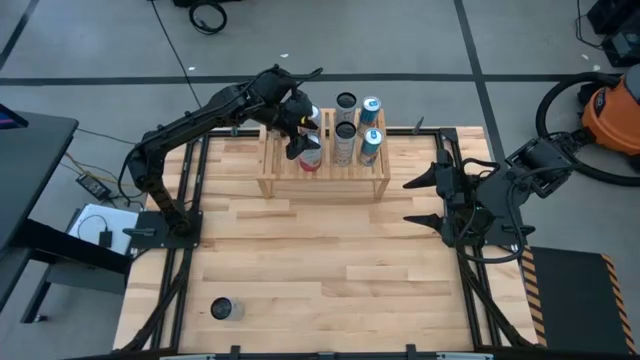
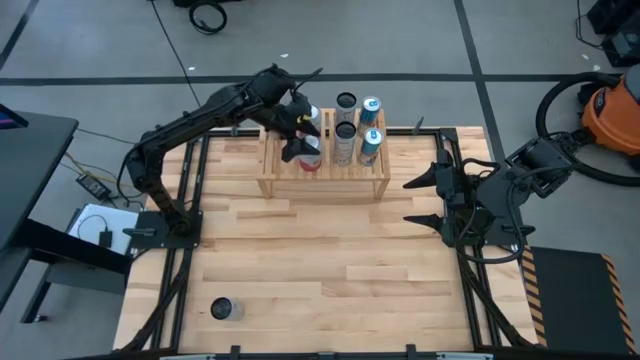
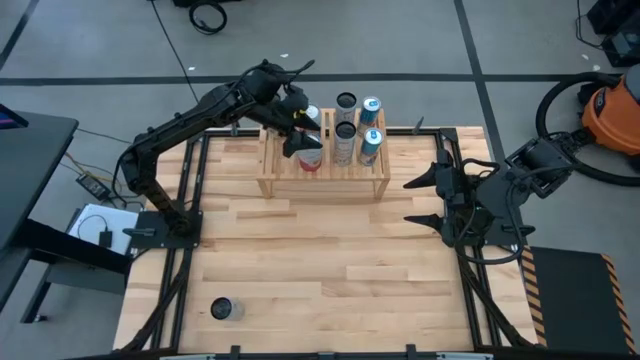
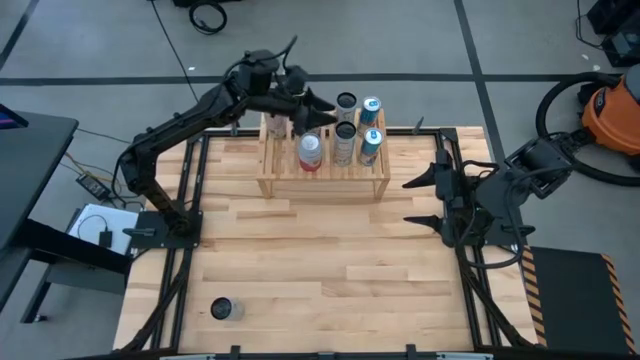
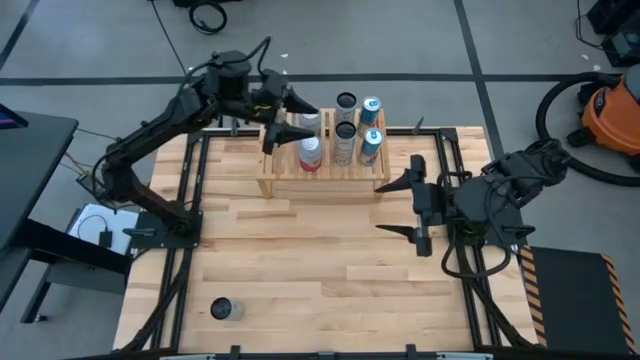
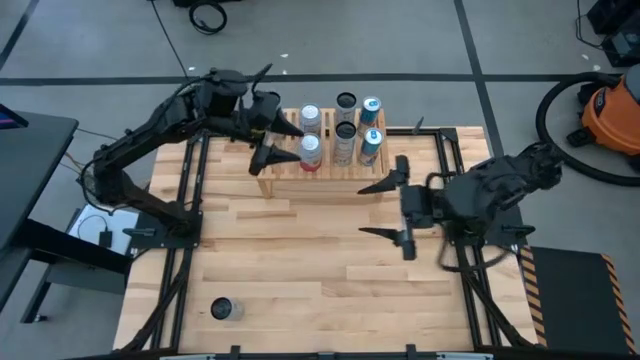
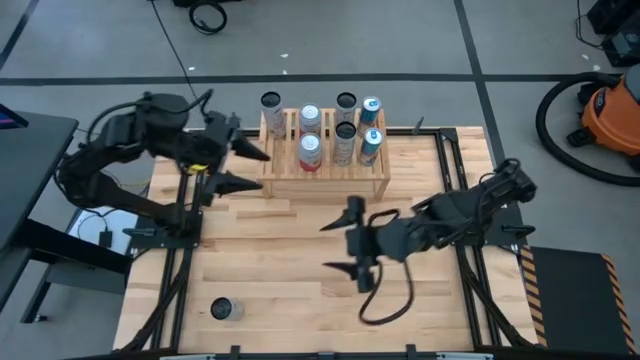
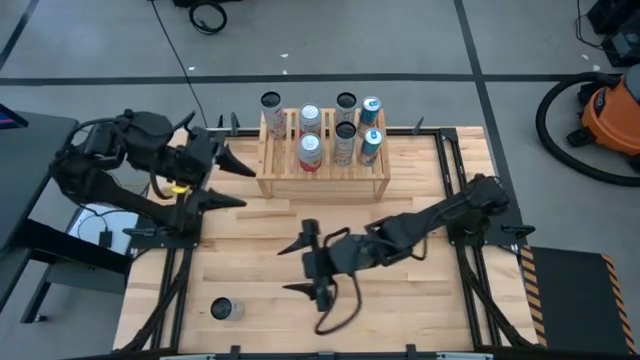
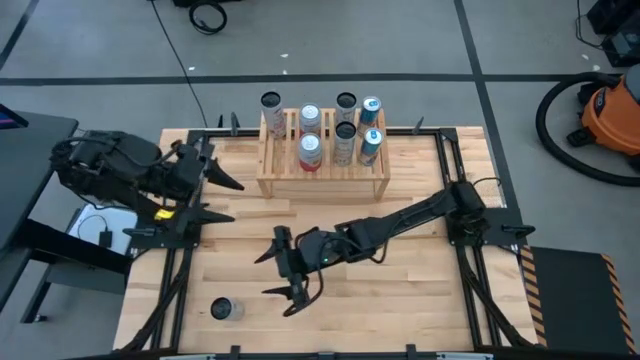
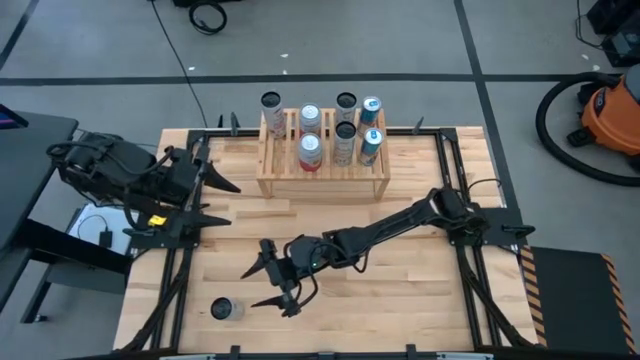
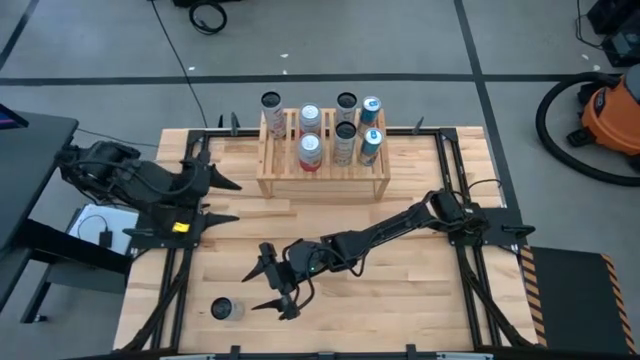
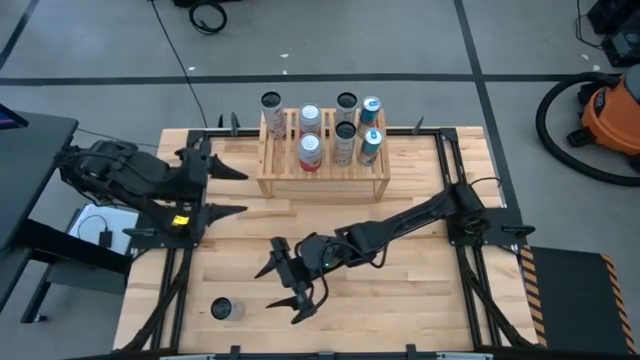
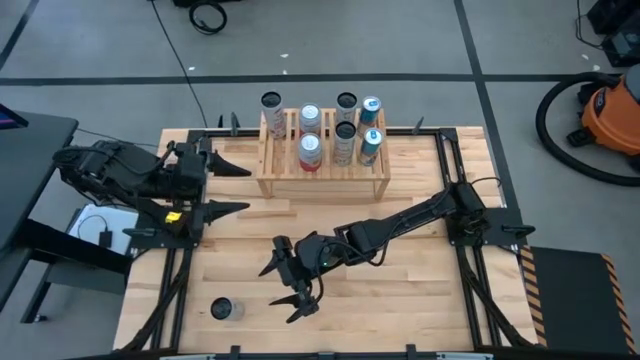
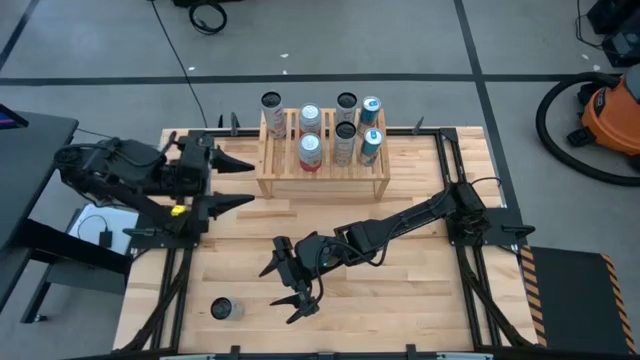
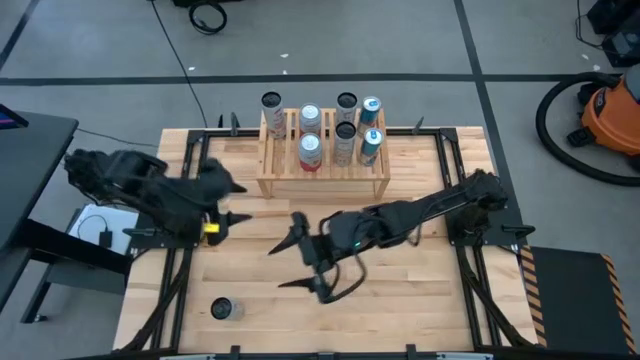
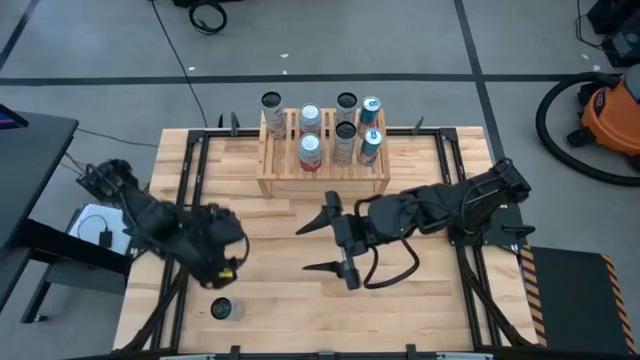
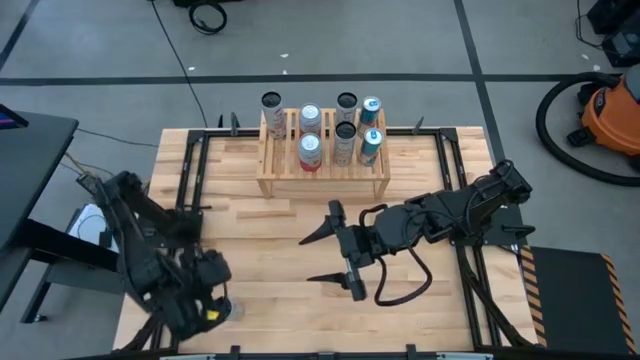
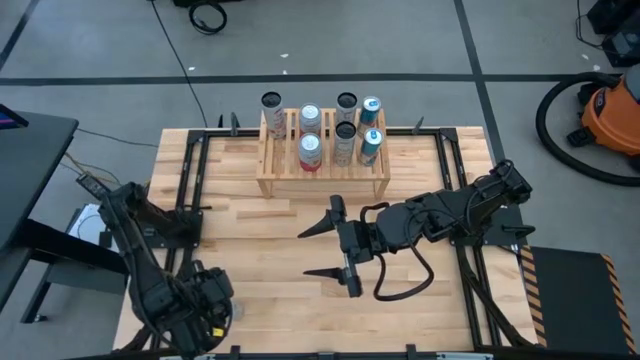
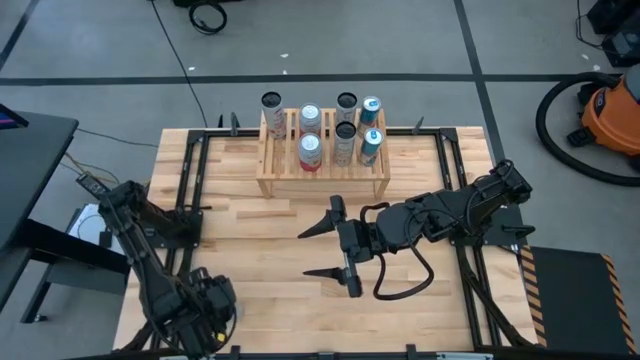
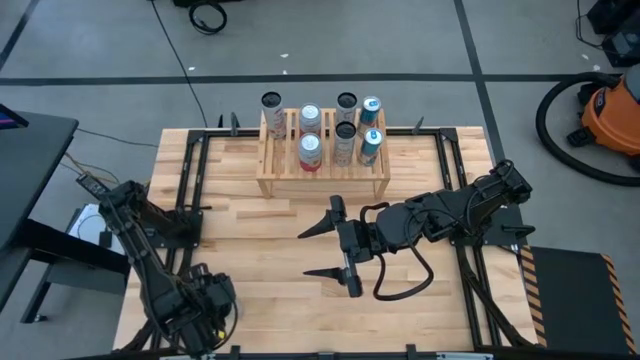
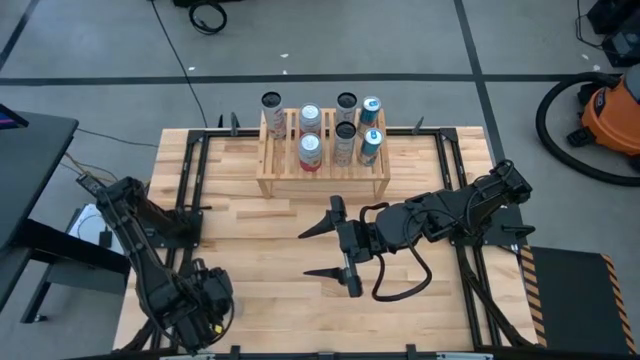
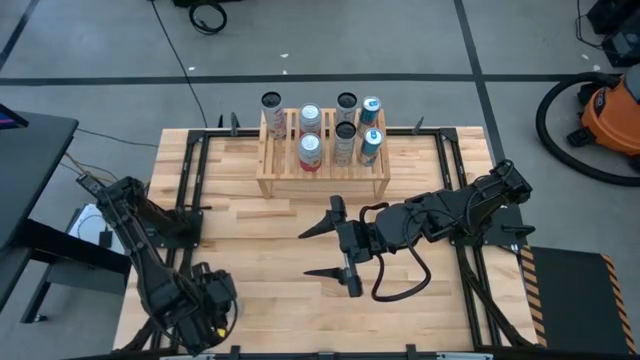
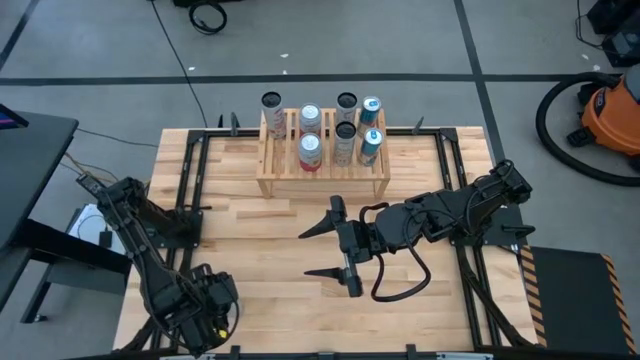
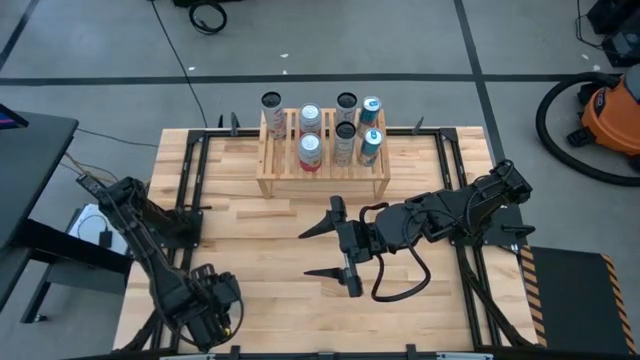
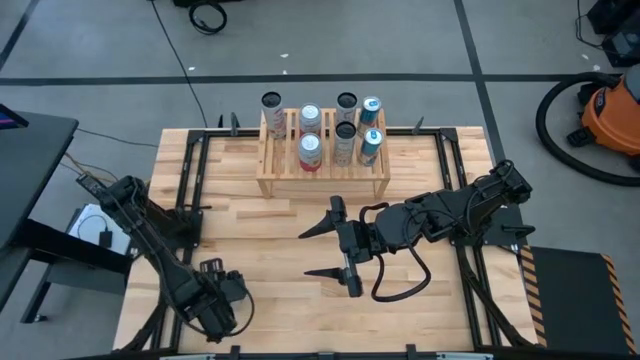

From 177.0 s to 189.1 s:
Task: Place canned beverage on shelf
Put the white and pink soda can on the shelf aligned with the other white and pink soda can

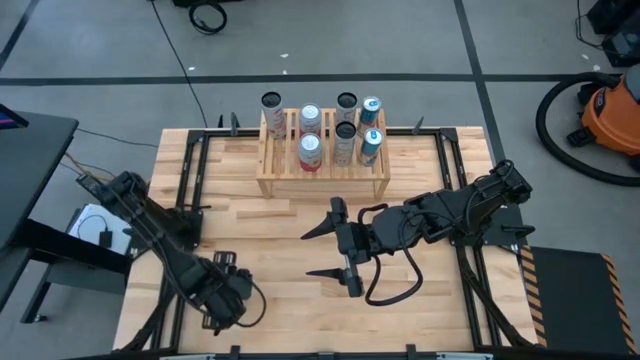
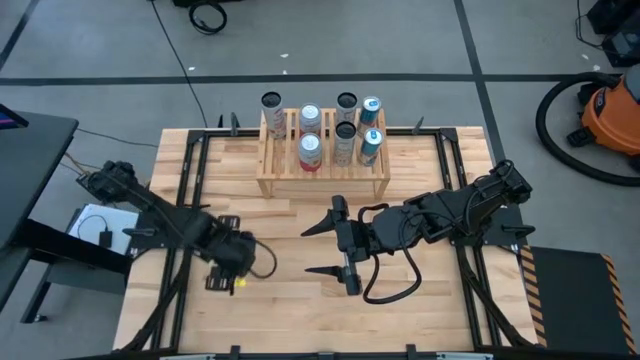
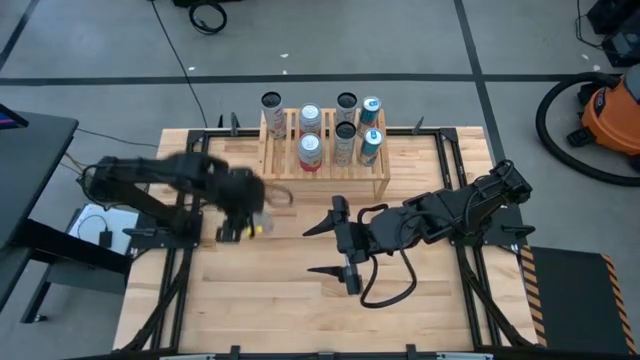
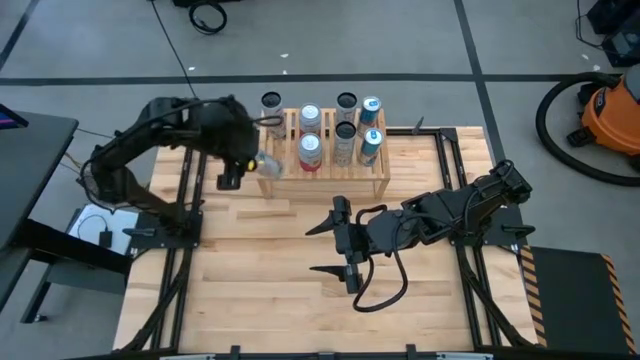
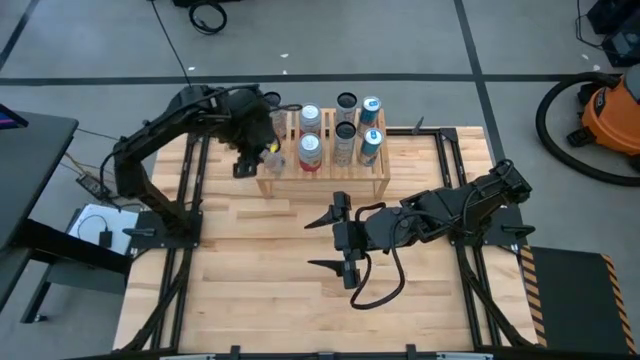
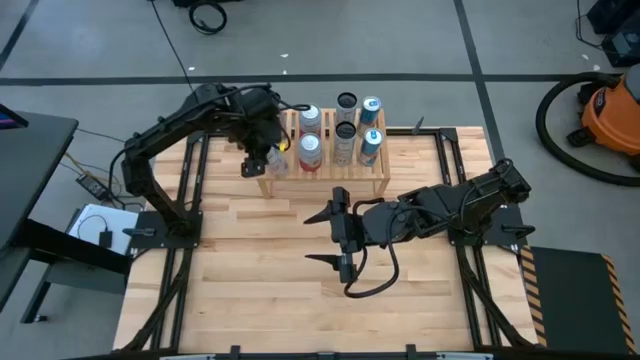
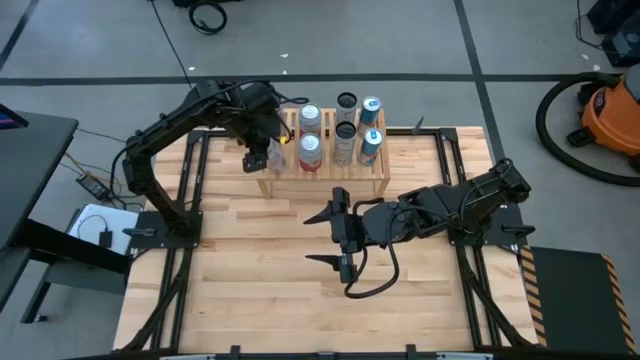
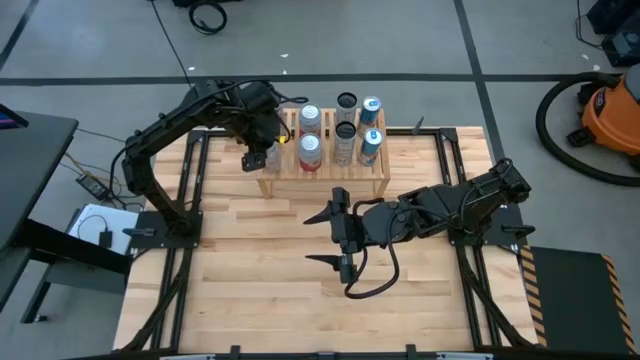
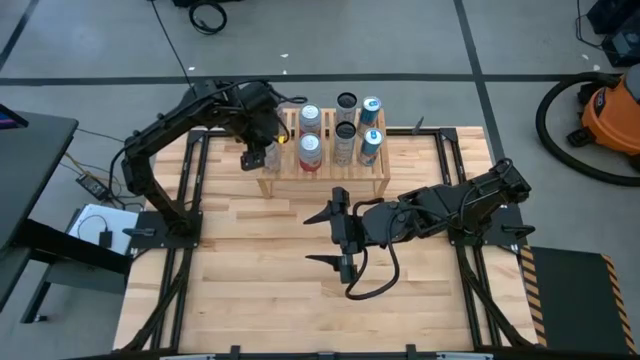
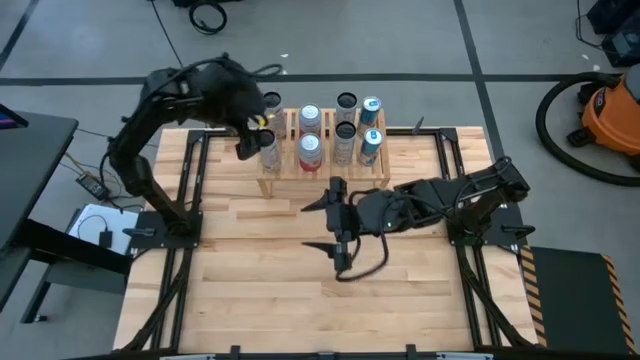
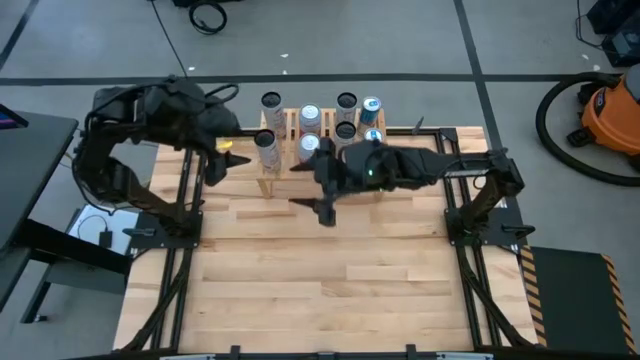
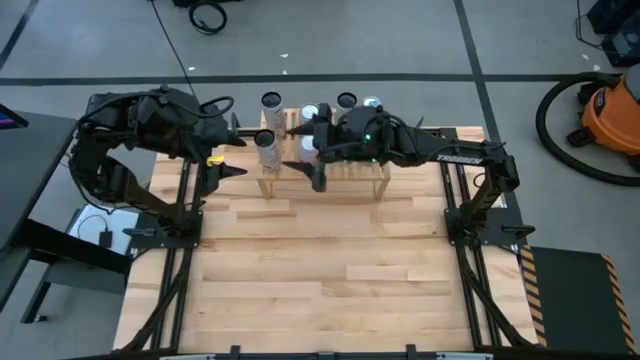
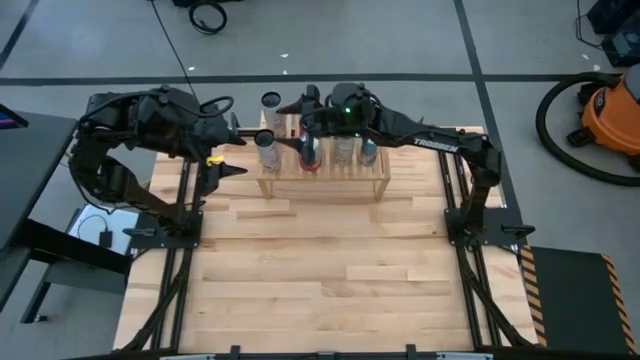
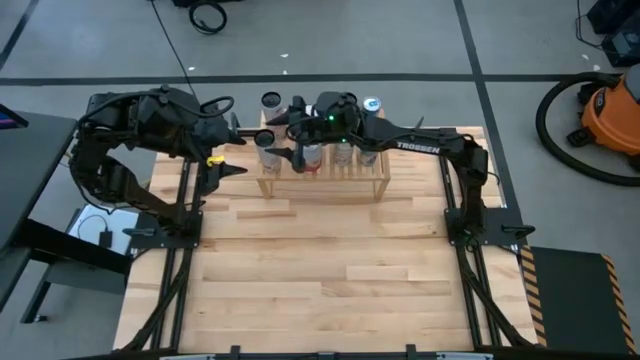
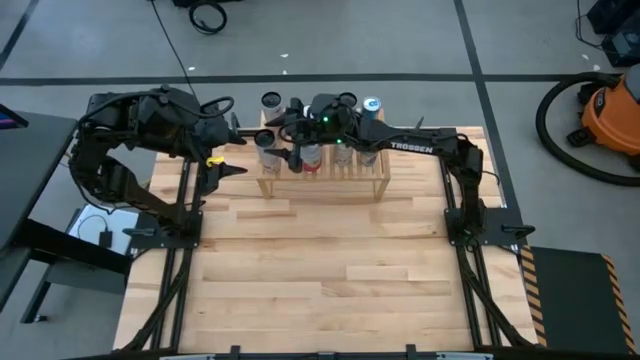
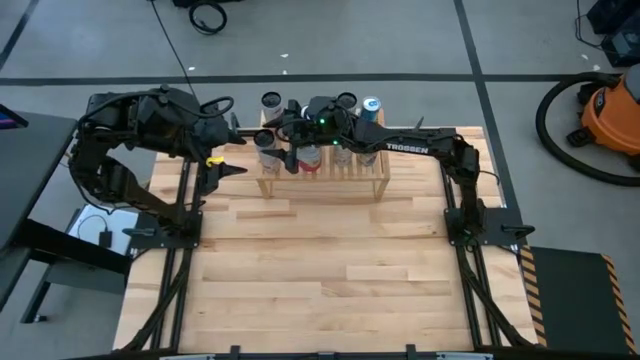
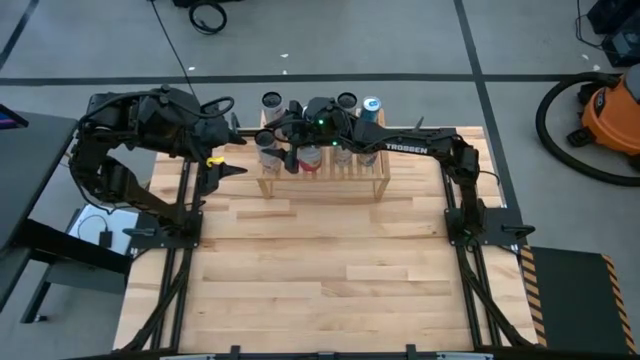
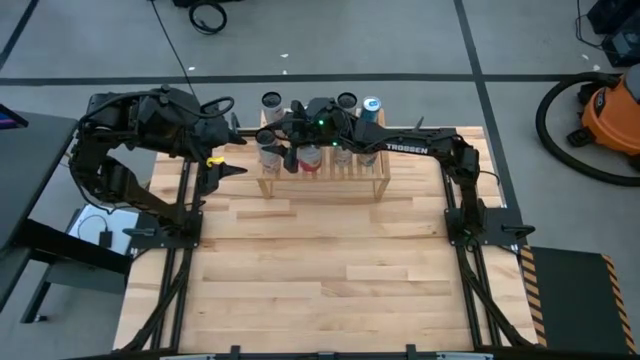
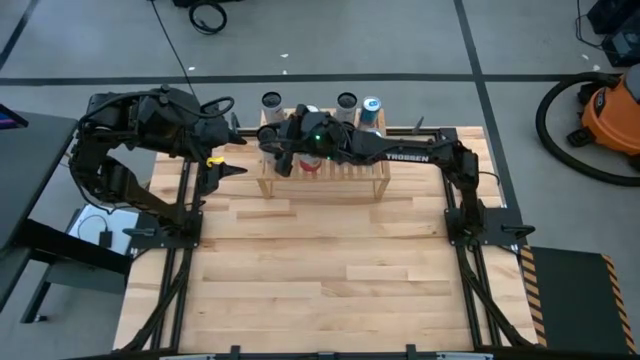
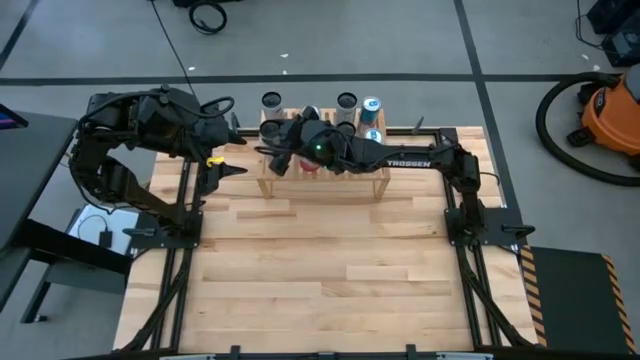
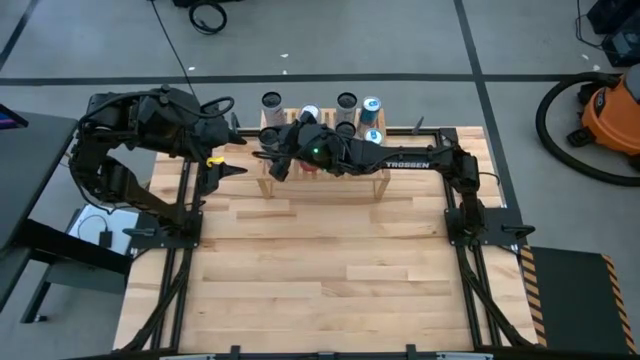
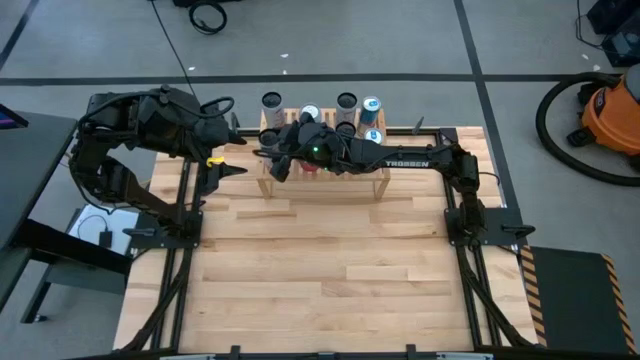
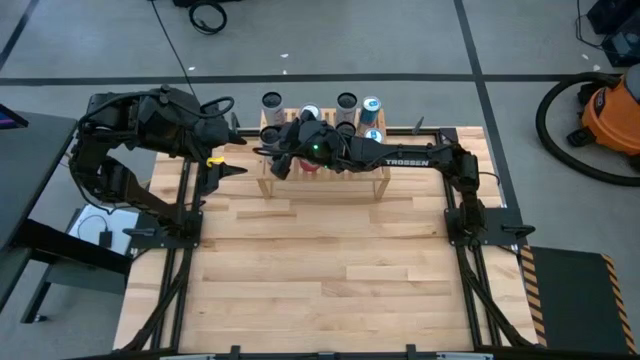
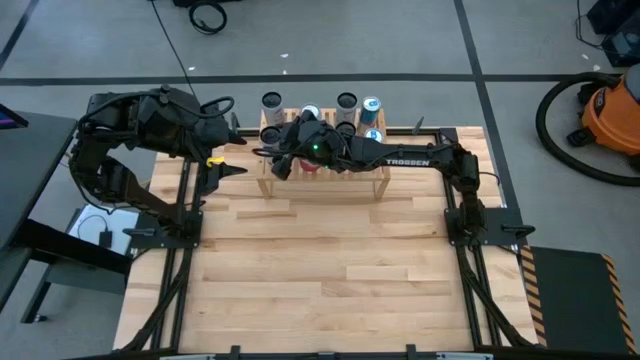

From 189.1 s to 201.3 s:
Put the white and pink soda can on the shelf aligned with the other white and pink soda can
